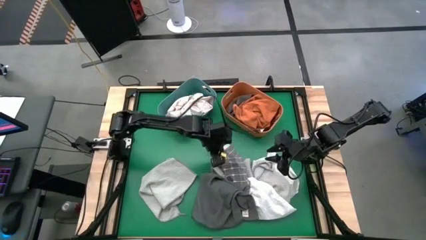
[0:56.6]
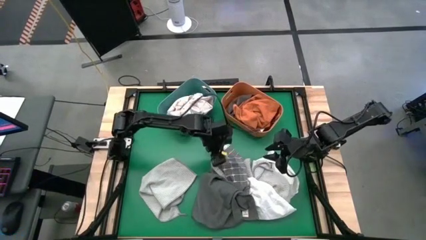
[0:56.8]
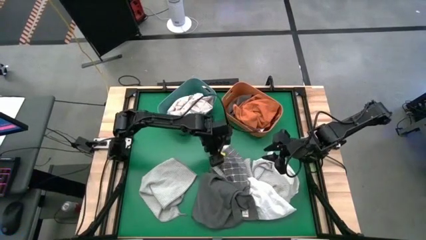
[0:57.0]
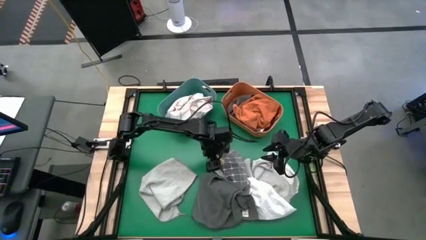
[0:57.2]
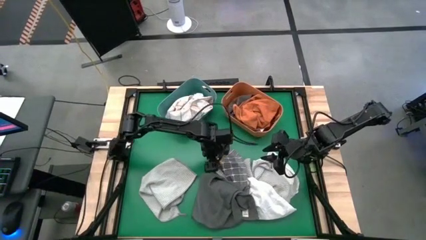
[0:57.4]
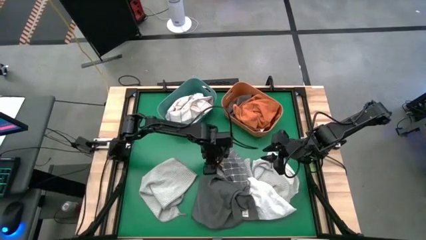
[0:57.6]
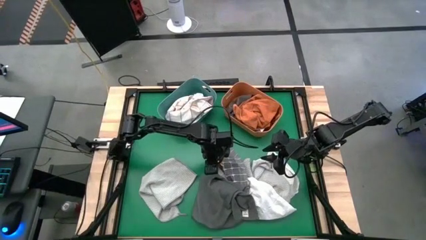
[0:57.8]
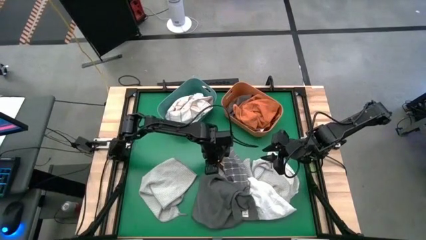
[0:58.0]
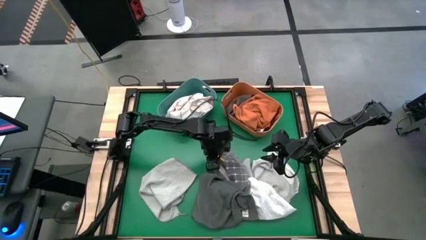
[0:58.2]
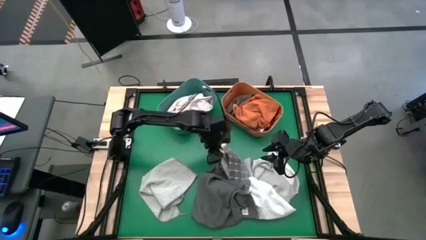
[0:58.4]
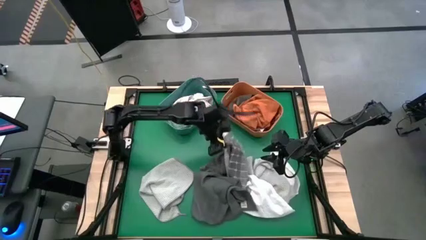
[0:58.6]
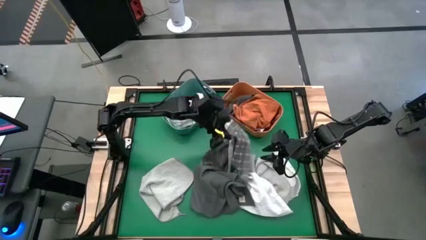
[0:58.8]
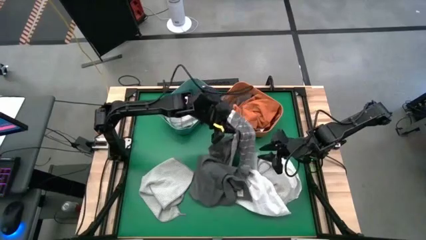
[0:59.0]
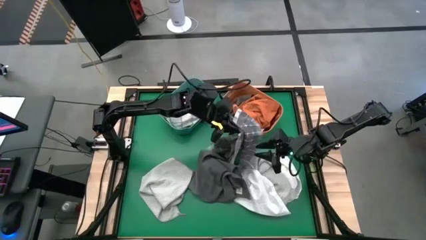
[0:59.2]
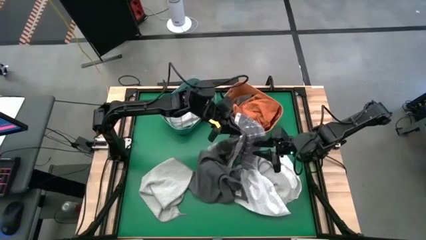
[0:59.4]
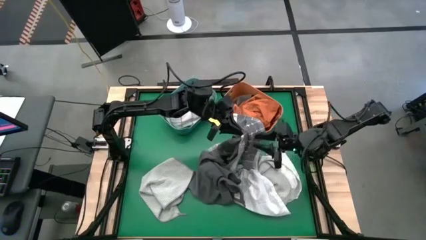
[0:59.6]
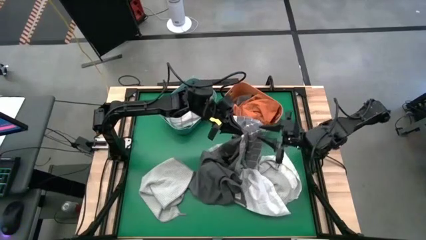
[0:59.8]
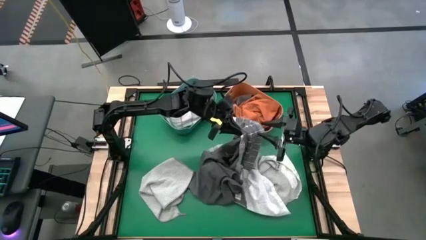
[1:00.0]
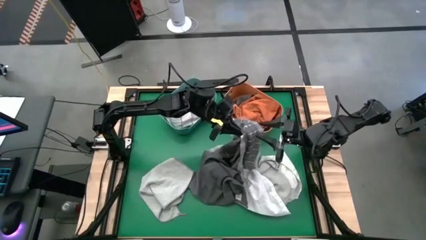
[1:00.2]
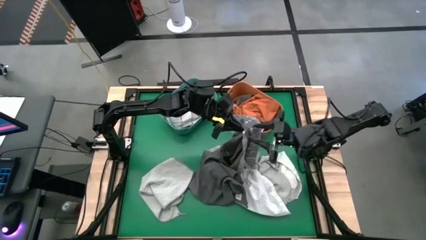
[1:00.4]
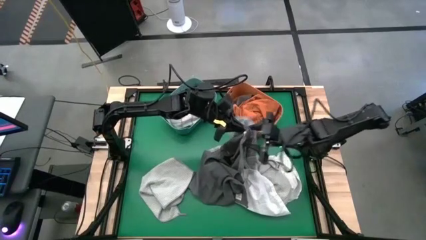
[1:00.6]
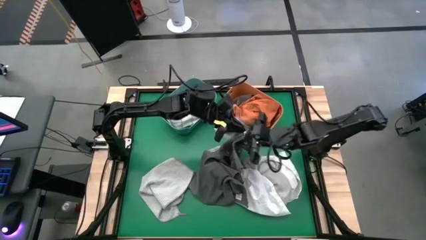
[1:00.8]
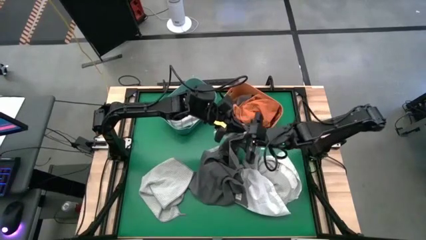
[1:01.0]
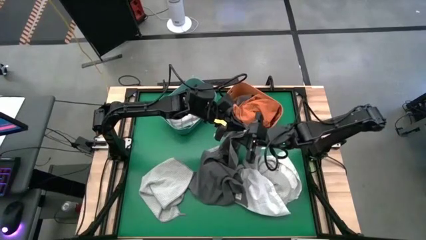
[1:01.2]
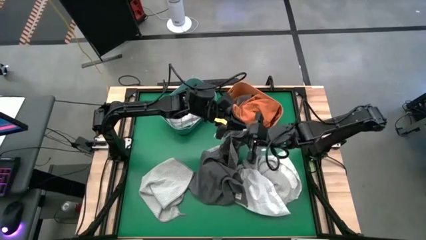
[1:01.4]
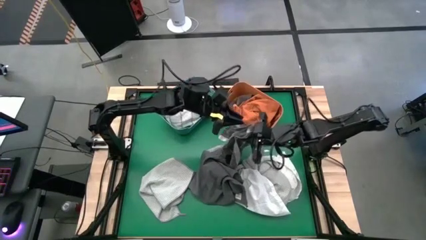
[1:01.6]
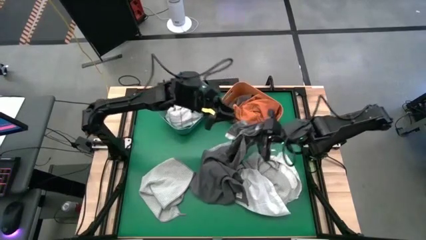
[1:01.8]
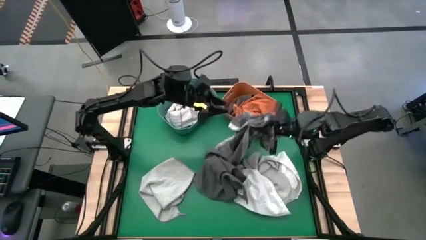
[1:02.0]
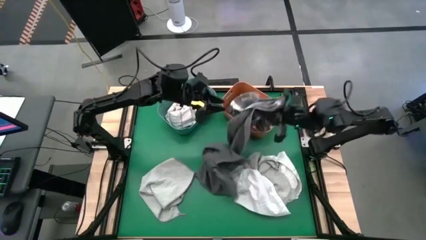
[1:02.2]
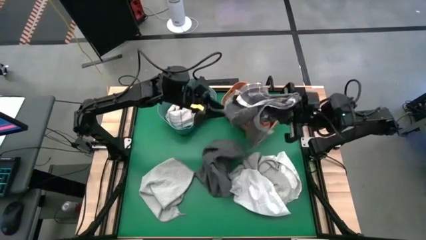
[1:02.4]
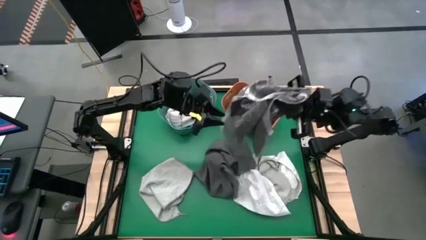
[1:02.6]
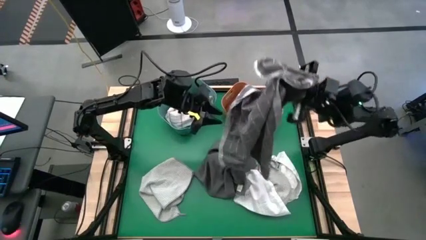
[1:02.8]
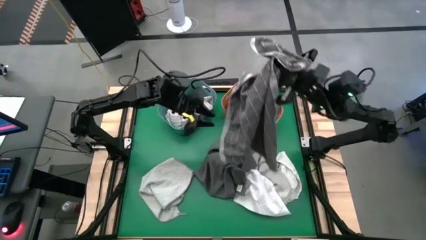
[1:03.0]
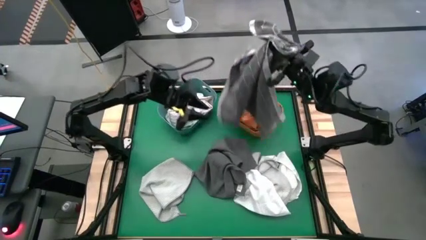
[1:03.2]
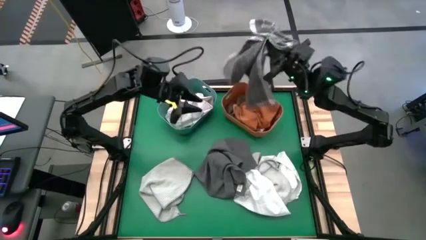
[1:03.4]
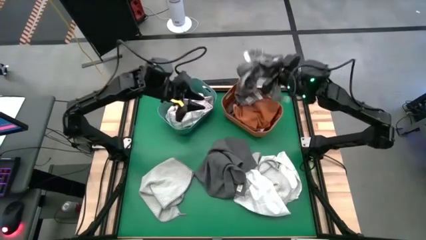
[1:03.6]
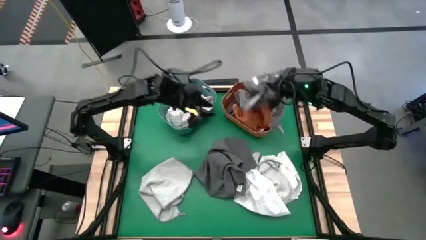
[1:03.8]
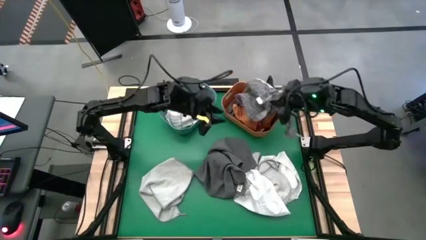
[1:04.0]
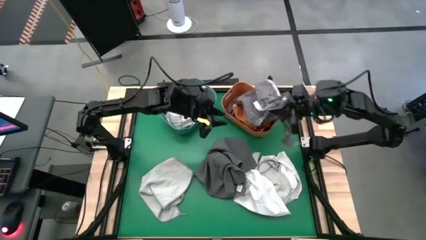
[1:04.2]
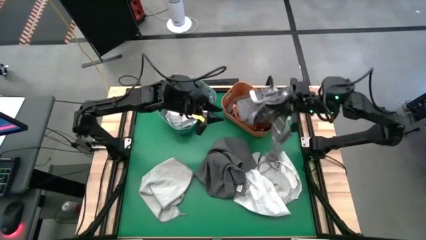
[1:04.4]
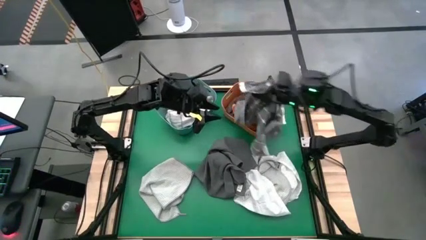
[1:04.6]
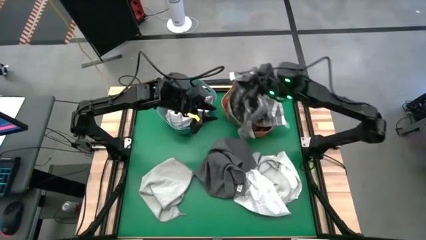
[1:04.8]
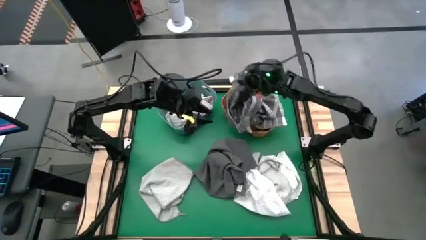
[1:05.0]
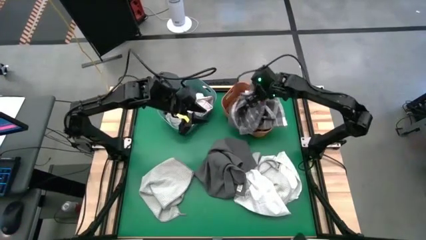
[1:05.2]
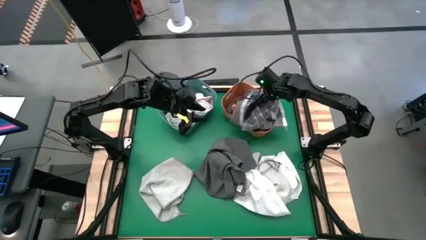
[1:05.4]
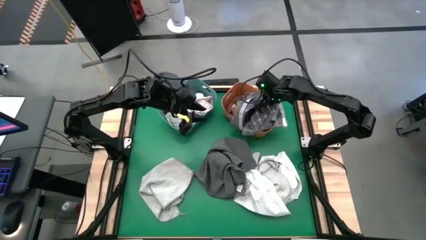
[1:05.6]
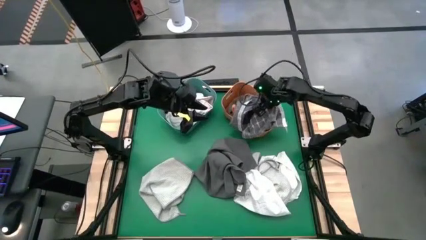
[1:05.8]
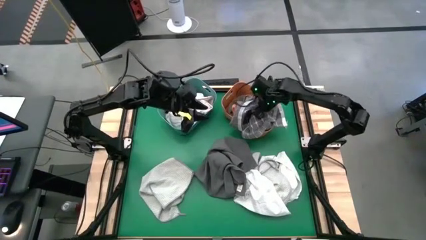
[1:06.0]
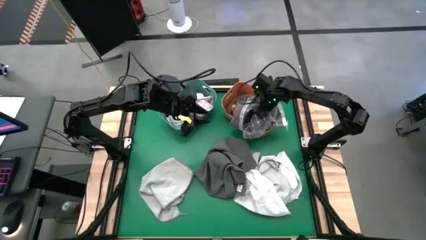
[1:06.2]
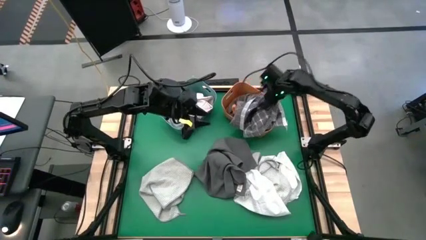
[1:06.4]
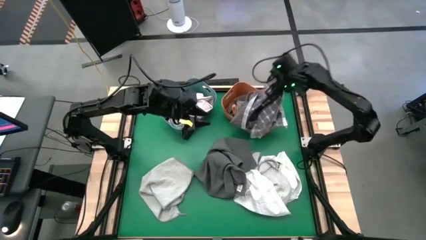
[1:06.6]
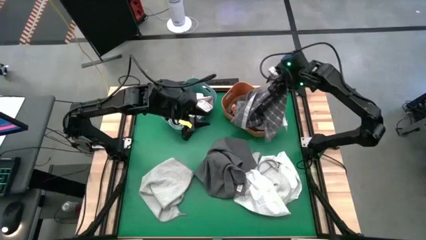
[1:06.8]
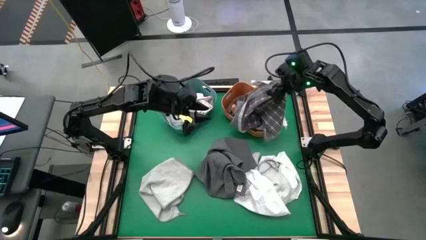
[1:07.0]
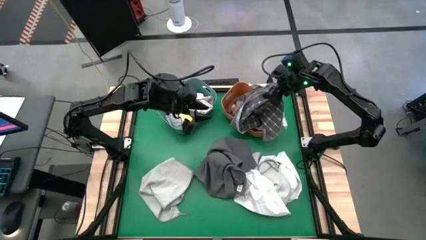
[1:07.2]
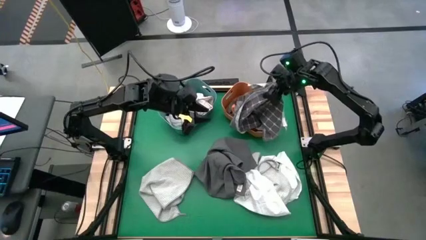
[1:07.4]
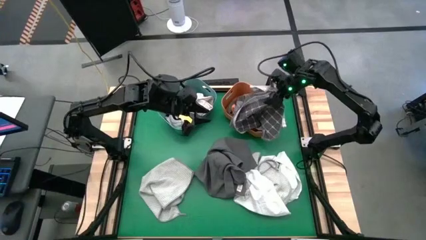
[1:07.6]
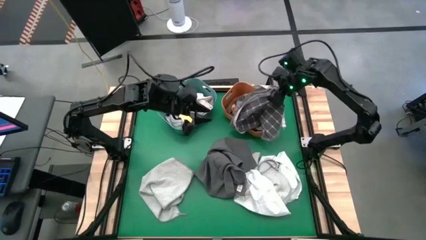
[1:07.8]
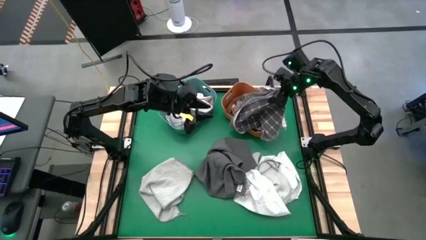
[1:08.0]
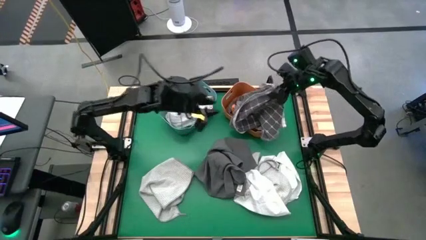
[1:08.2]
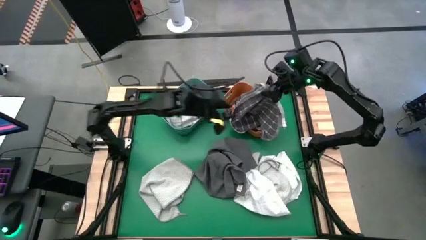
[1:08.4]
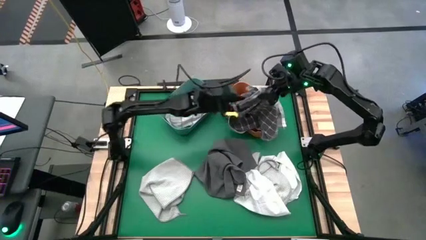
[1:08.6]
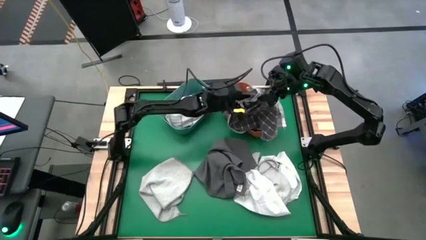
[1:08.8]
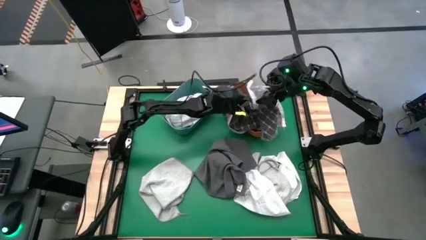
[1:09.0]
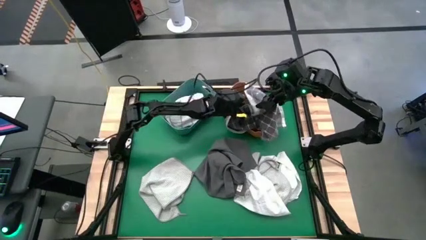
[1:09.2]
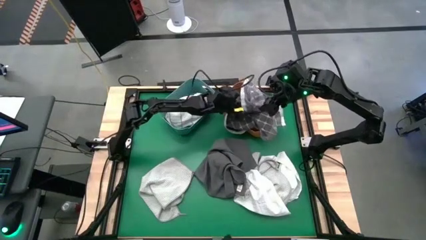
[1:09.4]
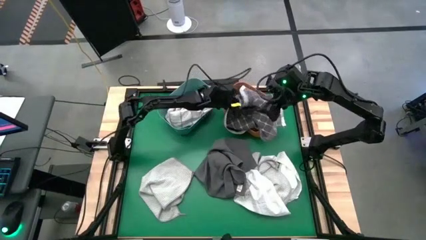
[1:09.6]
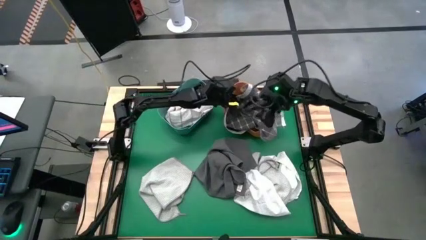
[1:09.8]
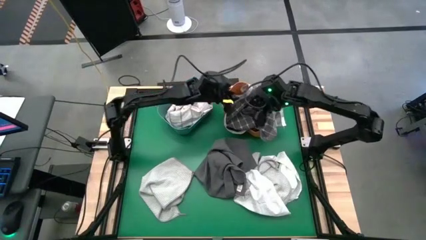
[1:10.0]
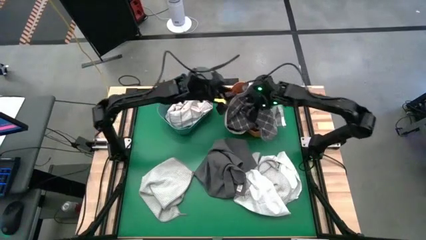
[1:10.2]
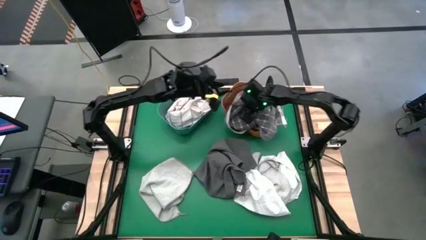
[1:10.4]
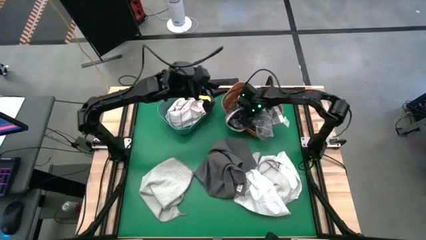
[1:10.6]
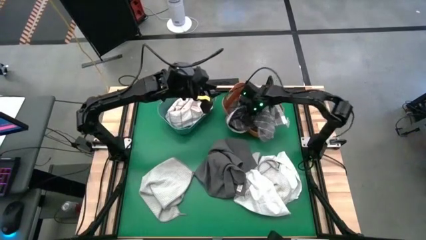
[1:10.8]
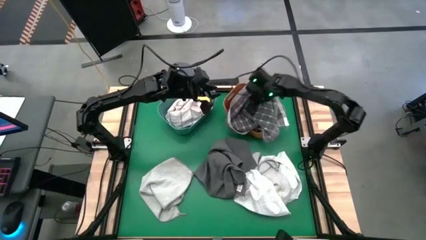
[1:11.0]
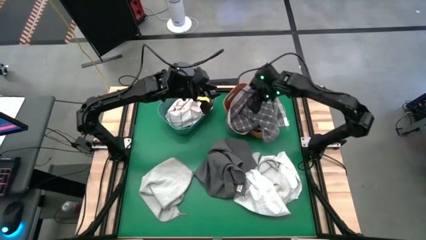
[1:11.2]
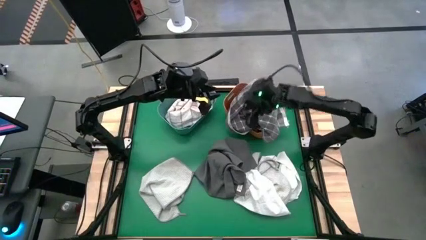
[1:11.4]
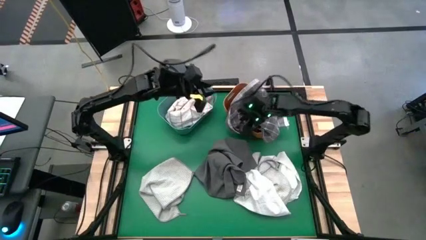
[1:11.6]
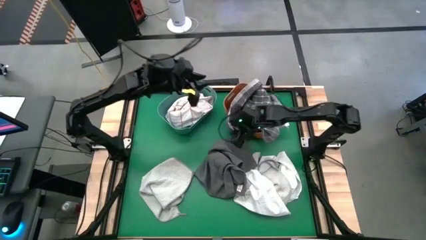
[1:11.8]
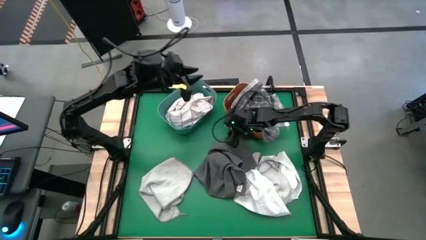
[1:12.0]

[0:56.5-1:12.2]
Task: Sort towels by color in basket
Put the gray patterned towel into the orange bin
